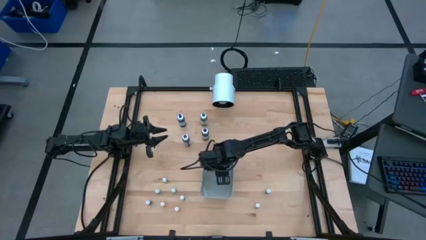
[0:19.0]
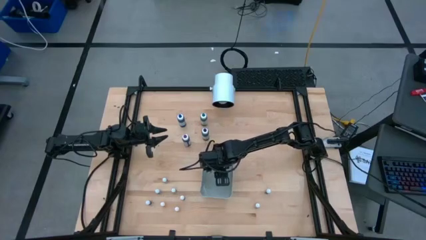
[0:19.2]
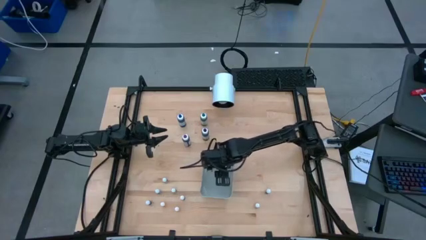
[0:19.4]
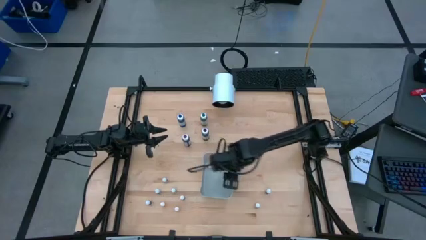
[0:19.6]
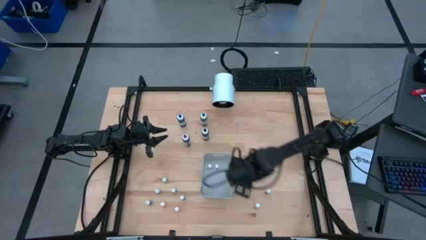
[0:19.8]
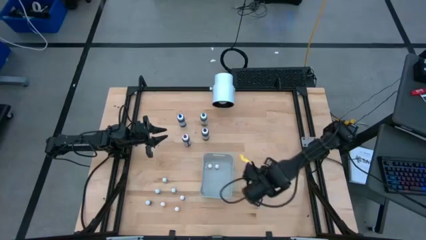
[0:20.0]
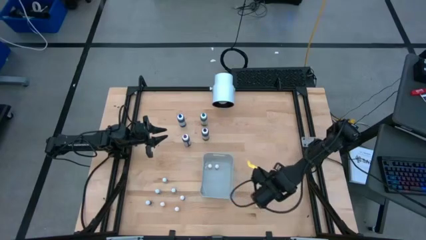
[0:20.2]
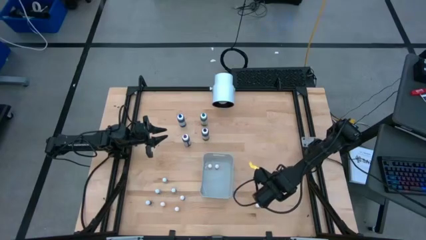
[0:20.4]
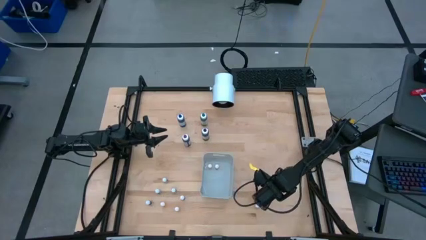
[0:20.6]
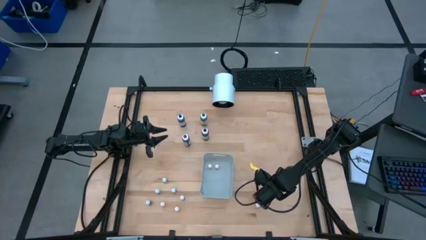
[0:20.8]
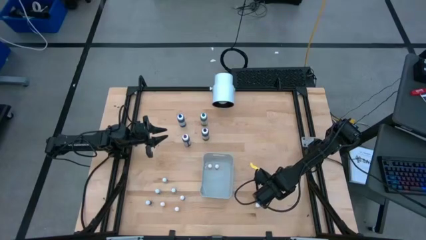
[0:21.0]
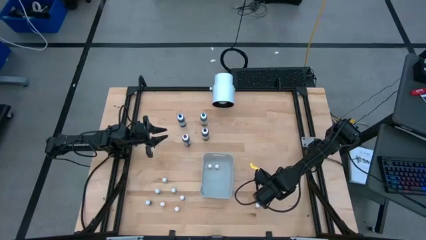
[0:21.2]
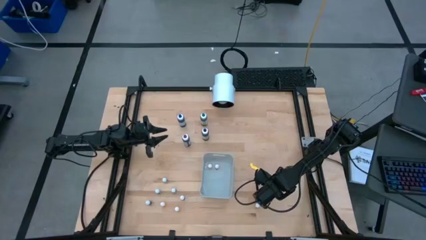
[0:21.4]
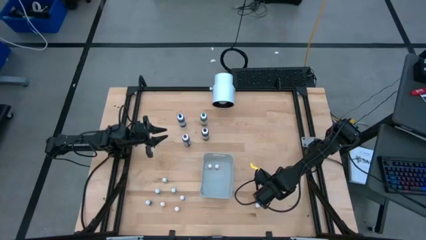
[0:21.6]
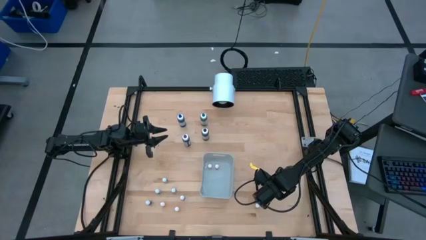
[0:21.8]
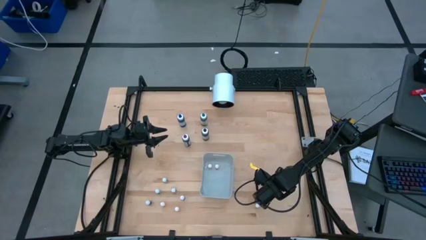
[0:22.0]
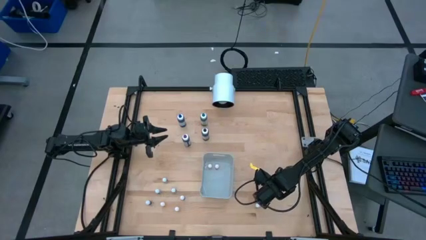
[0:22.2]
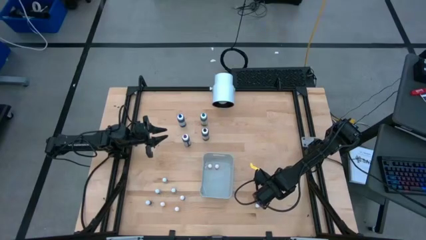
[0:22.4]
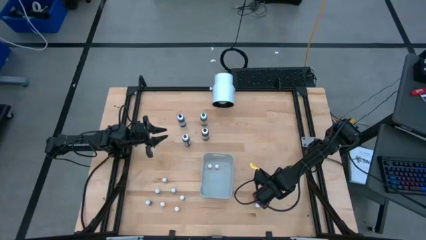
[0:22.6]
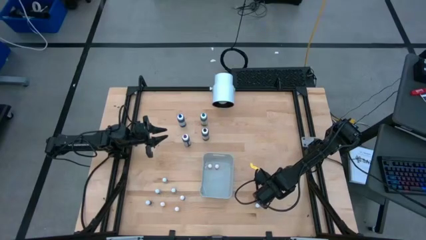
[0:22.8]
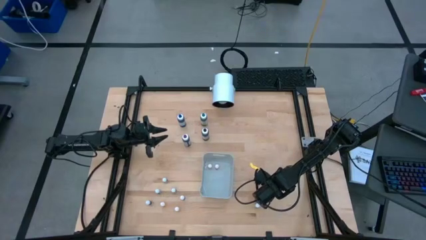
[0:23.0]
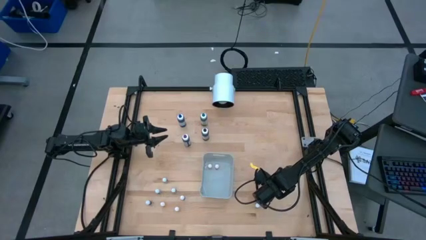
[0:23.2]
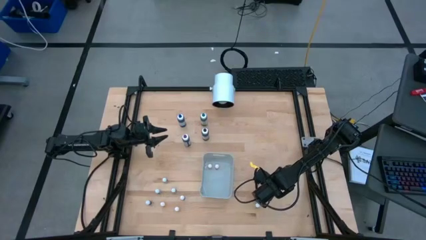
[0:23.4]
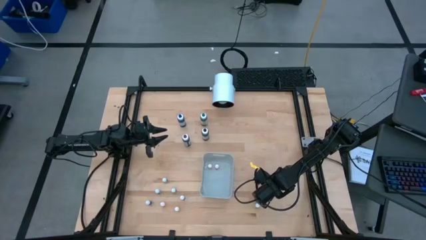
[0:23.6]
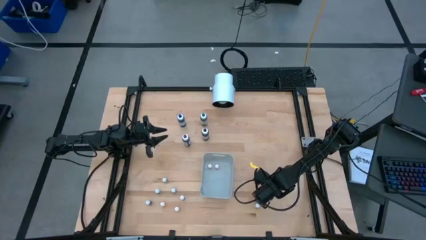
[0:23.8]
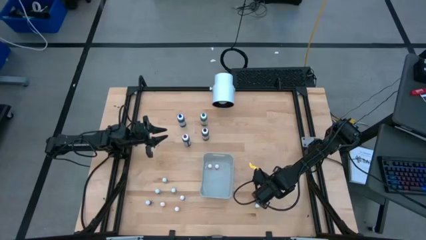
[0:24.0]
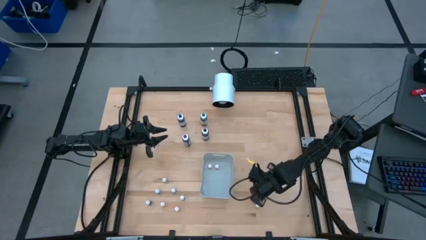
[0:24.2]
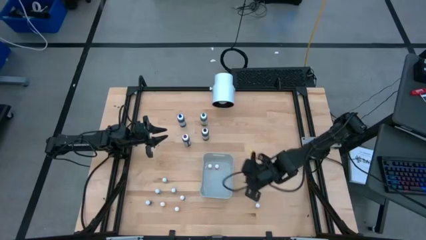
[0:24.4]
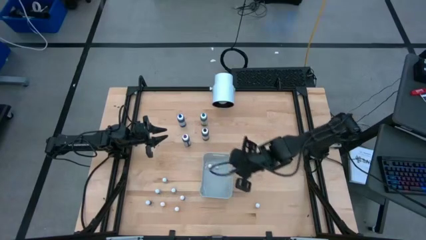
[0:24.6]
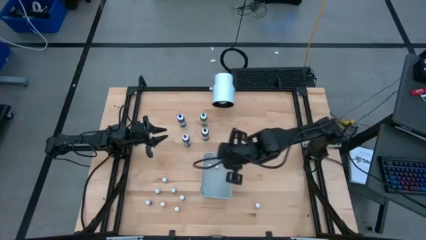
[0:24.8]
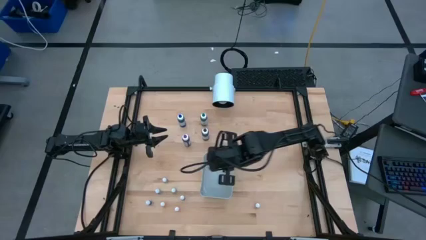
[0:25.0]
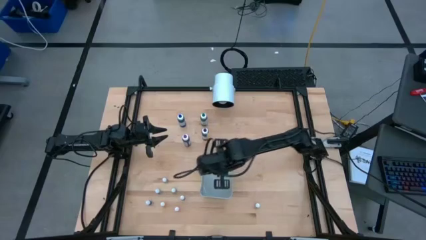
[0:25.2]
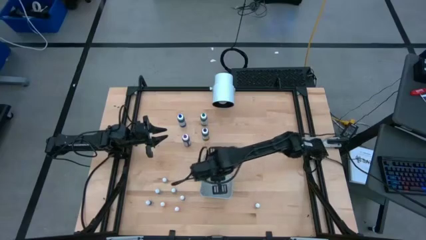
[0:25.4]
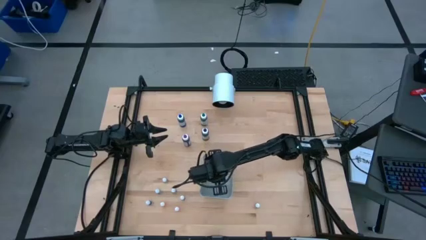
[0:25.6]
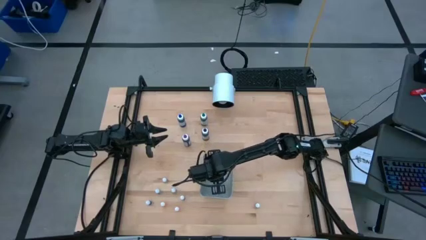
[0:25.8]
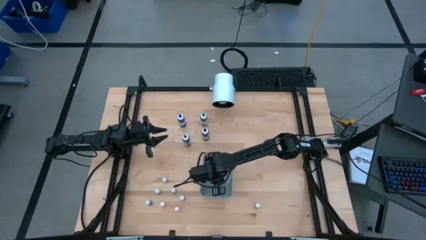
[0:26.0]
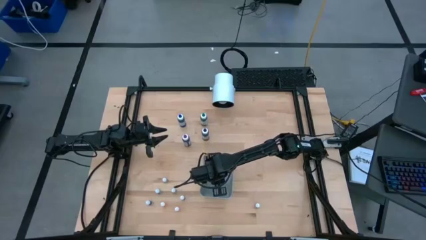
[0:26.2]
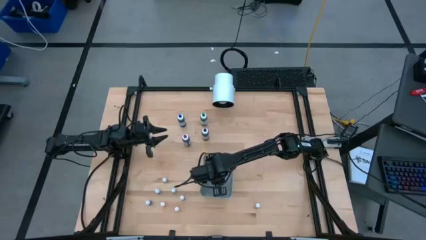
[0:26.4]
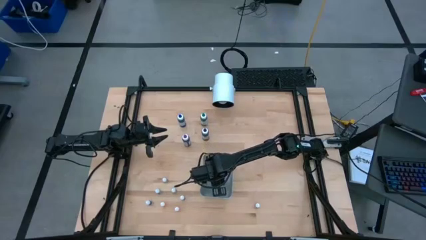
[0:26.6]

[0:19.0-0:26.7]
Task: Pick & Place food coloring
Put the small purple food coloring bottle into the gray bin

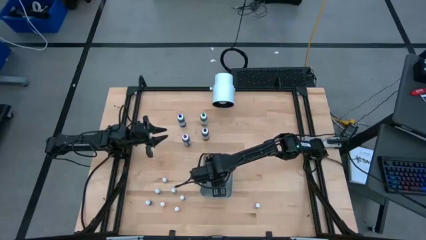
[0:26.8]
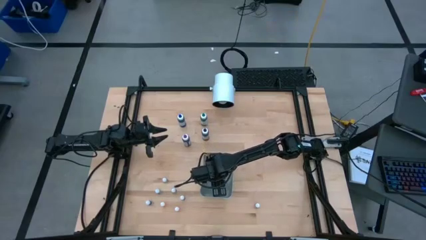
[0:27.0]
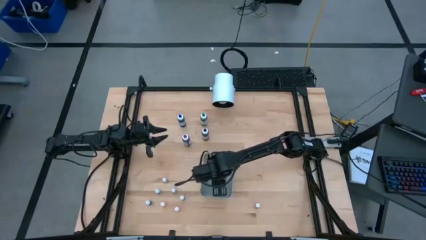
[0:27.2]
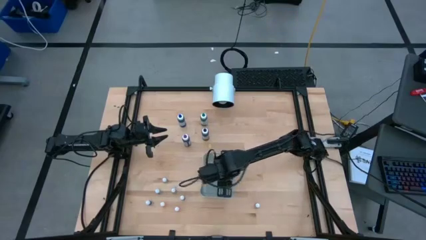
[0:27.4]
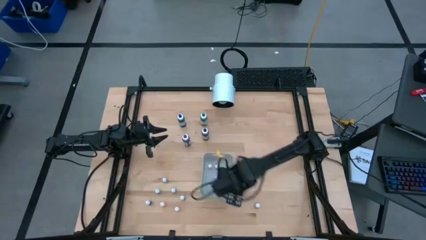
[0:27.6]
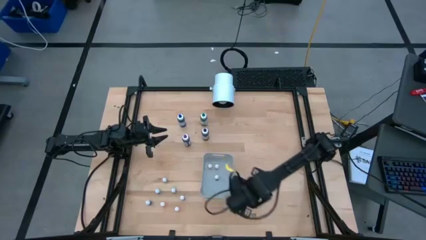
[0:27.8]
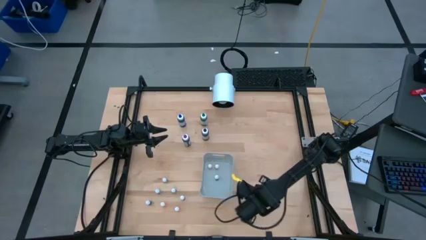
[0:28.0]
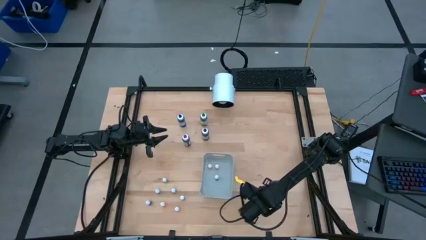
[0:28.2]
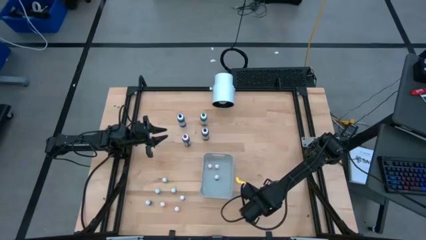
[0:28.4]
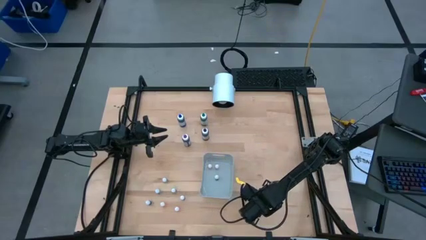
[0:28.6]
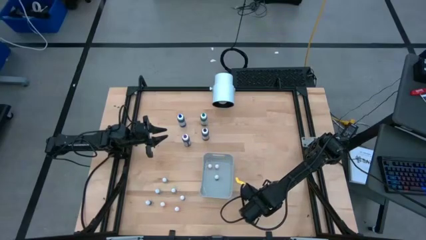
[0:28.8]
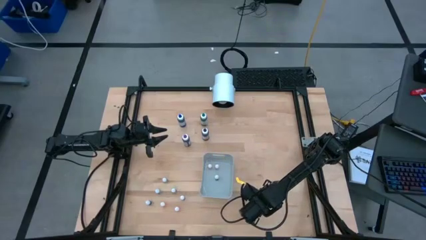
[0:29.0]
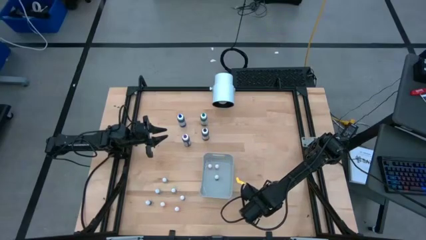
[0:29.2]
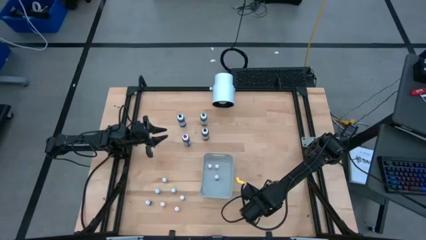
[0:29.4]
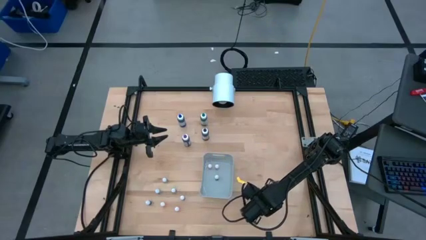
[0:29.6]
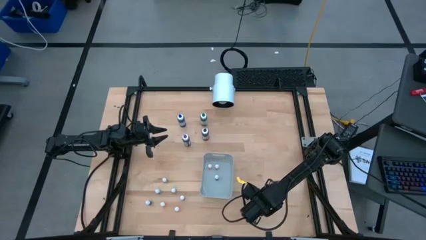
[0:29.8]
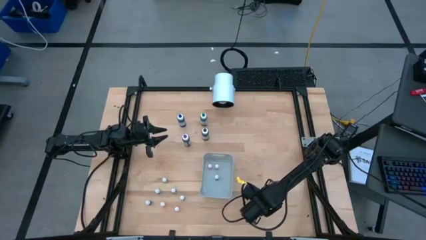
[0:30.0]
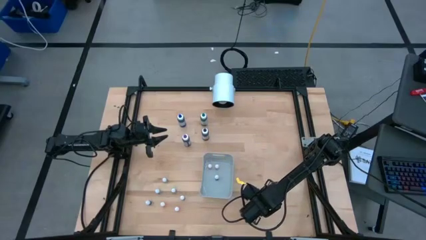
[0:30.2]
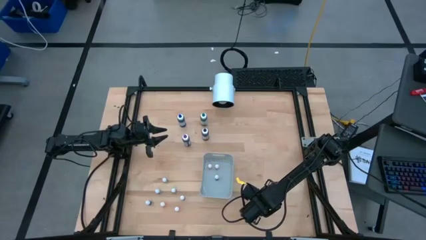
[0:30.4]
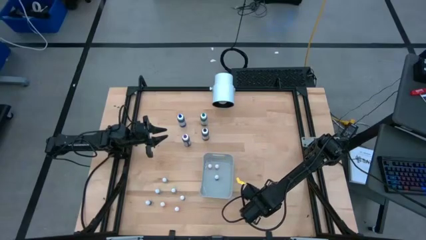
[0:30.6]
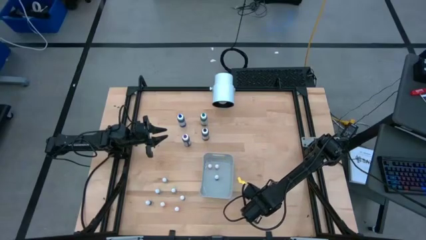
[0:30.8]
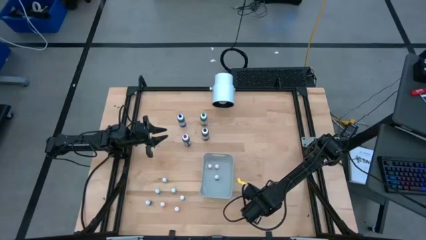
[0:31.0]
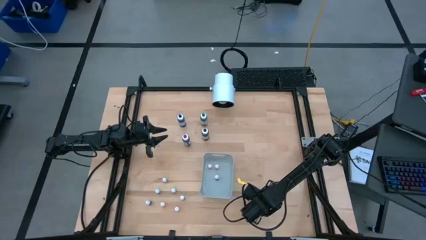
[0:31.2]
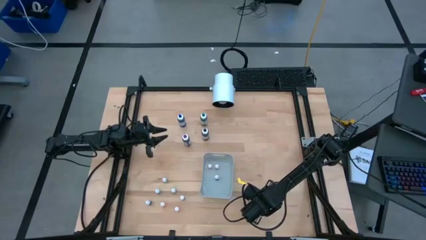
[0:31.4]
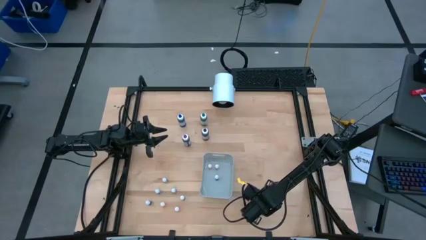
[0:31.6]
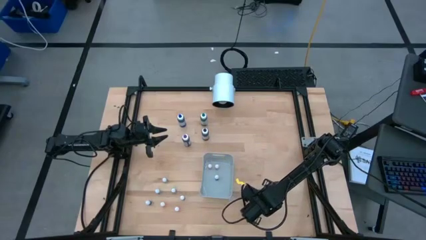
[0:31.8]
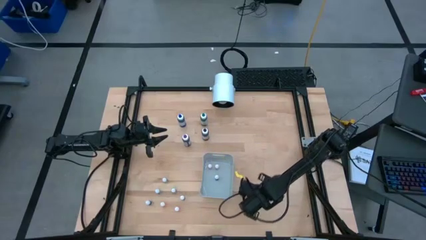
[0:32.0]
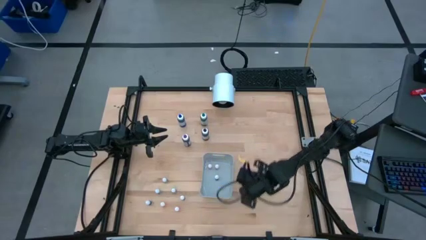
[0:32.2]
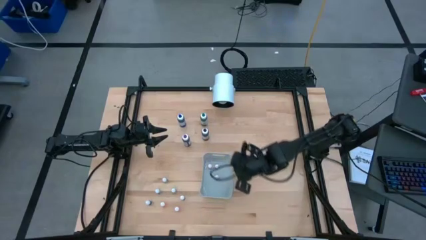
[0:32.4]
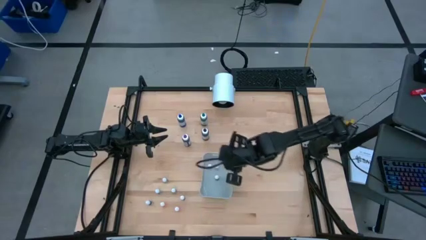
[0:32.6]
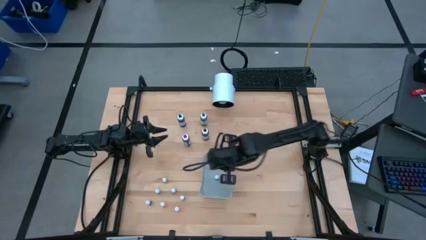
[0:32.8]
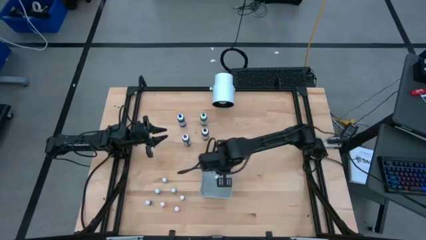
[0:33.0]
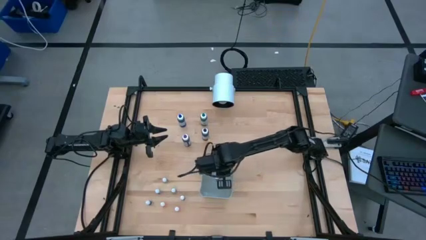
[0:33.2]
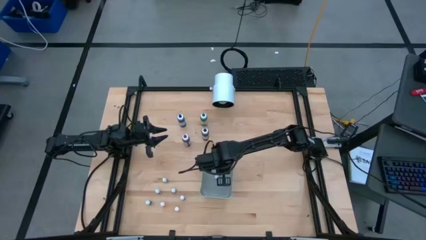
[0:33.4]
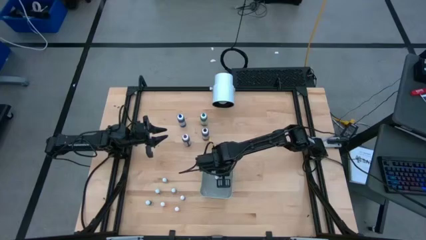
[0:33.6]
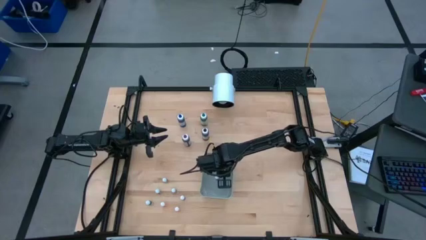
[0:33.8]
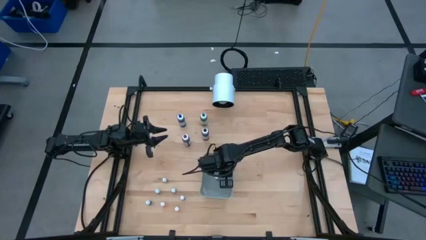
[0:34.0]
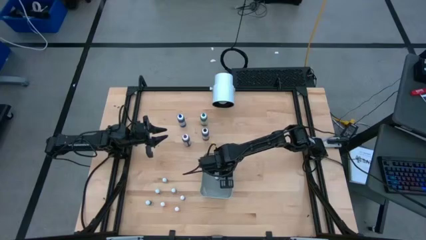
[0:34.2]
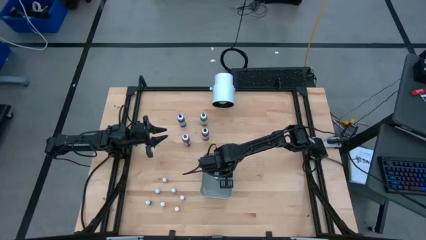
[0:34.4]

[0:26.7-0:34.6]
Put the small red food coloring bottle into the gray bin
